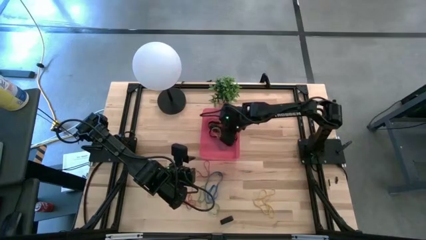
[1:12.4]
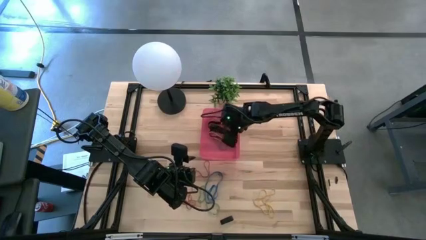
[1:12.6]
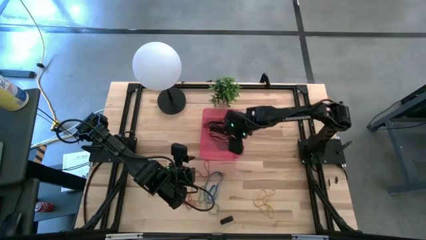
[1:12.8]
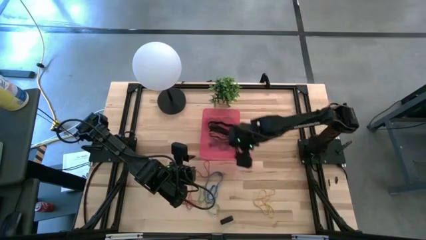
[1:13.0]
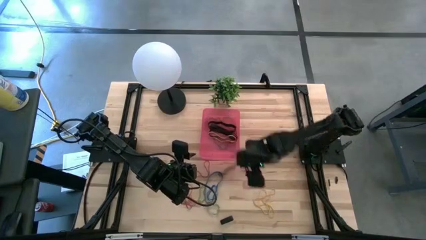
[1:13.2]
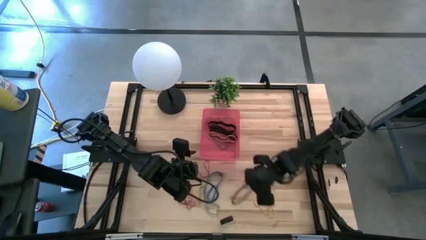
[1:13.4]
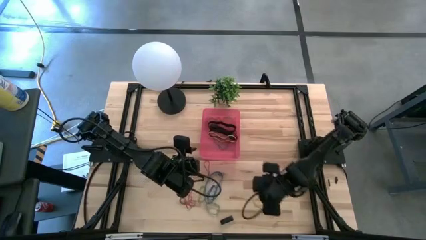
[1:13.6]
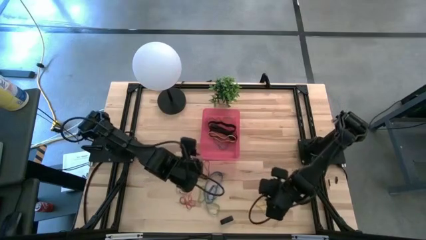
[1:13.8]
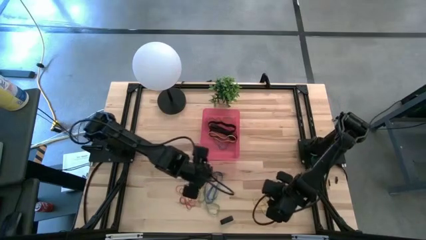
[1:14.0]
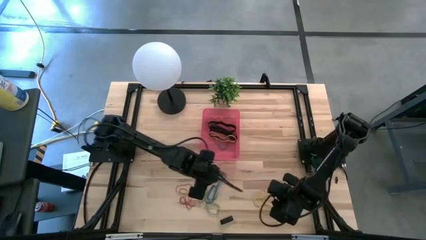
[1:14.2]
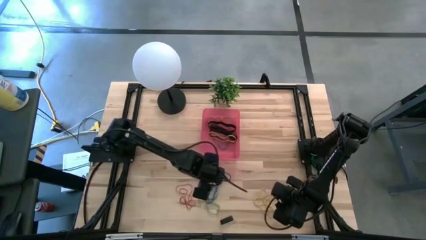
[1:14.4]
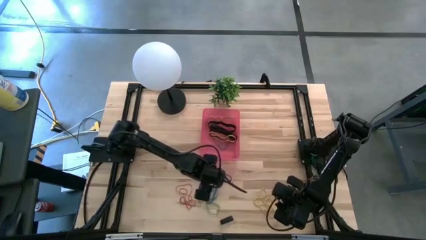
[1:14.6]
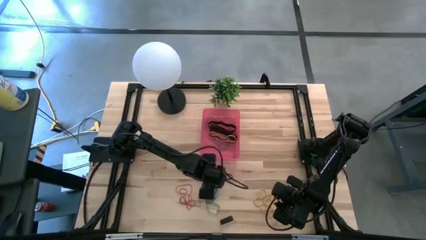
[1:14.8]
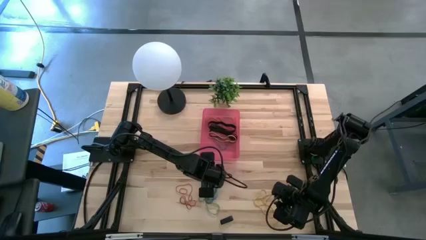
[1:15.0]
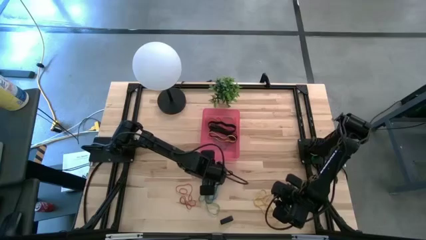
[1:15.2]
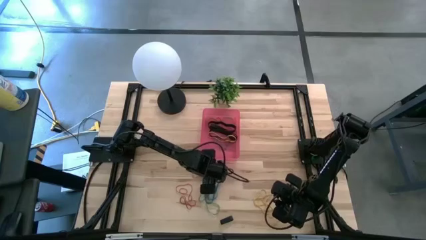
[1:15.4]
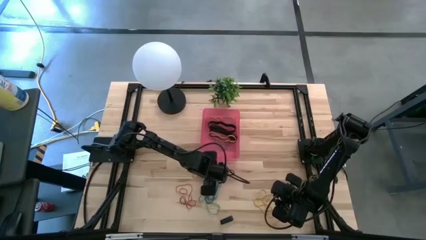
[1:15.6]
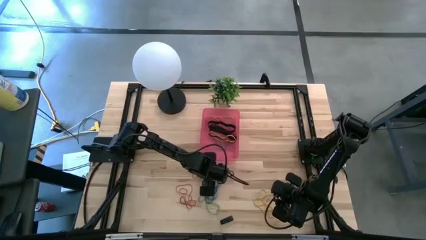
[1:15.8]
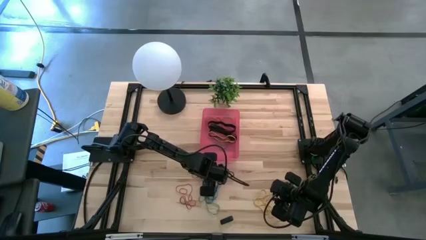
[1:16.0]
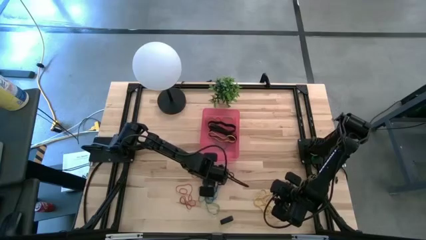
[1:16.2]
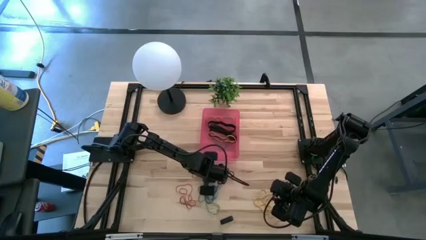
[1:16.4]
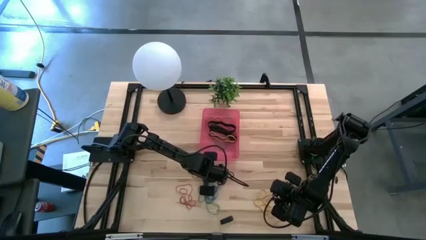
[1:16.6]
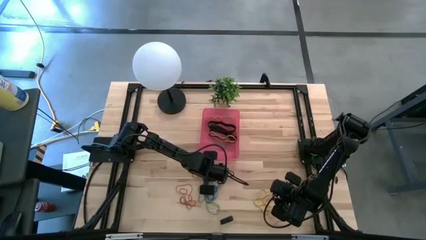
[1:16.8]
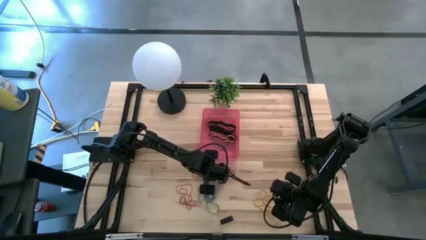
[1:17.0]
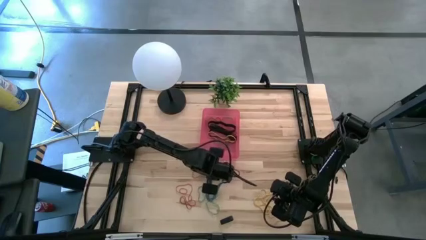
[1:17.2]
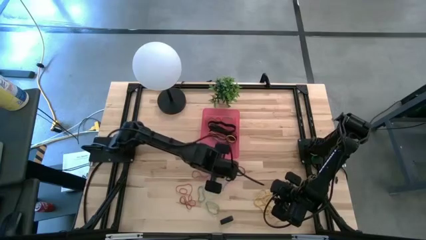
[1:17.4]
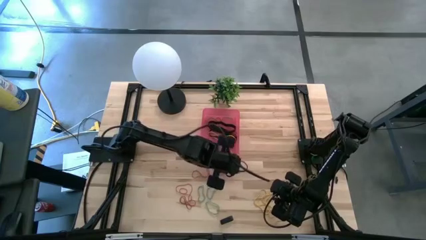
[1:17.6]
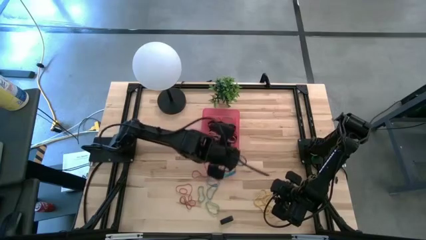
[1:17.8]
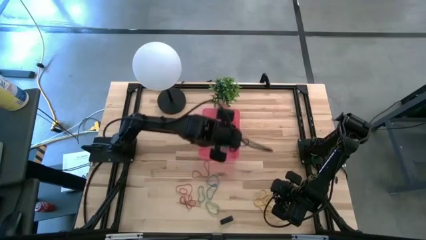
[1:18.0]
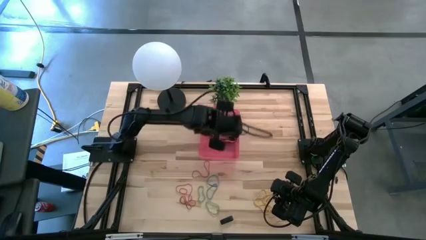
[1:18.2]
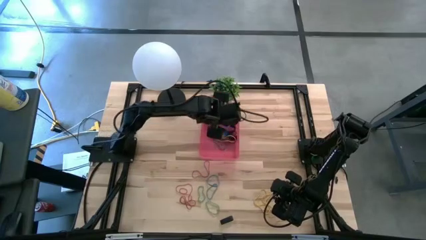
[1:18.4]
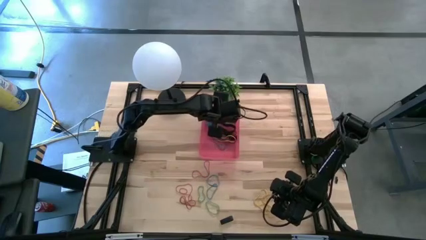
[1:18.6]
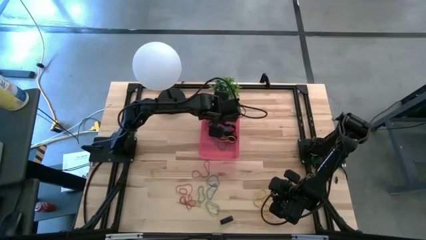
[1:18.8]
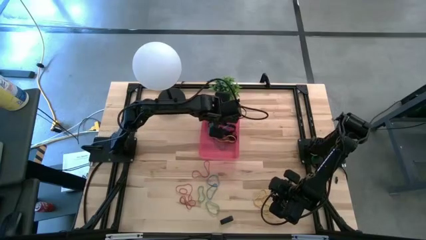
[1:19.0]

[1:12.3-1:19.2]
Task: Pick and place rubber bands into bin
Put the blue rubber band into the red bin

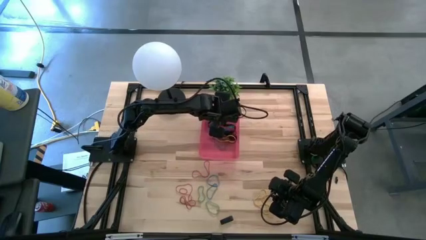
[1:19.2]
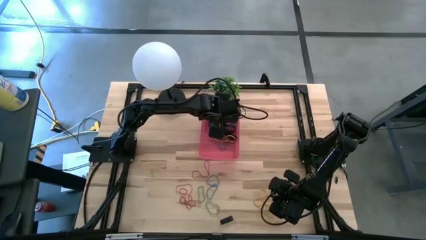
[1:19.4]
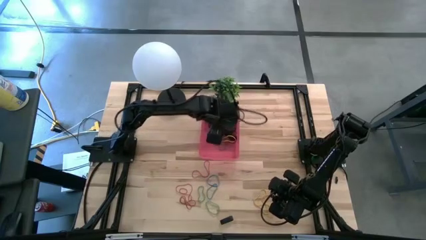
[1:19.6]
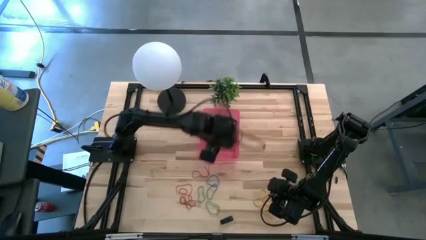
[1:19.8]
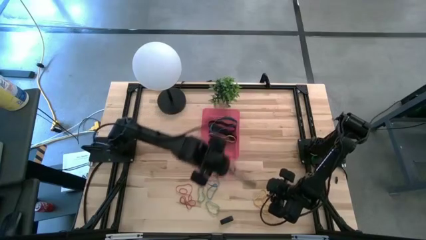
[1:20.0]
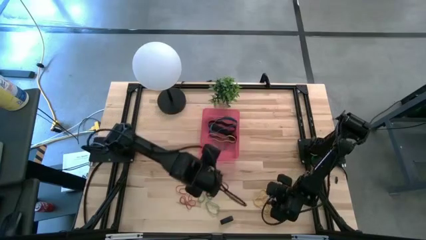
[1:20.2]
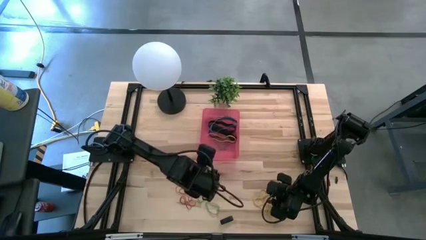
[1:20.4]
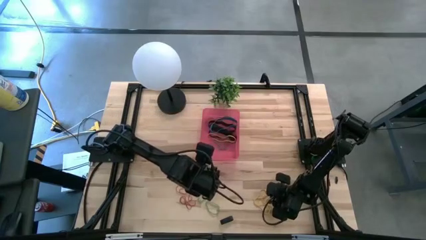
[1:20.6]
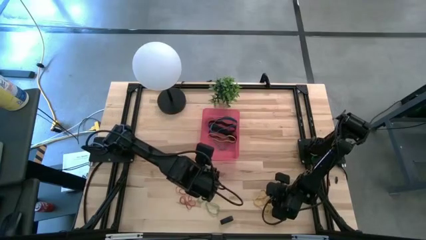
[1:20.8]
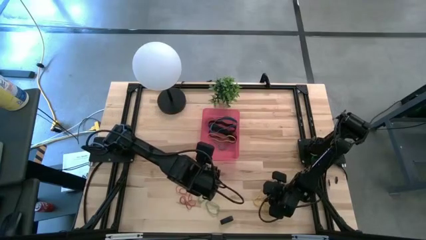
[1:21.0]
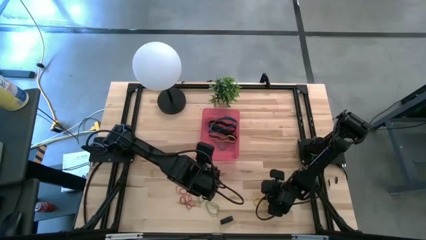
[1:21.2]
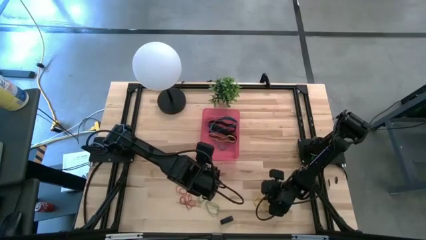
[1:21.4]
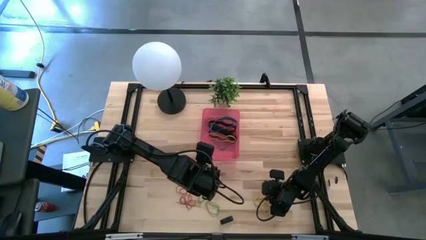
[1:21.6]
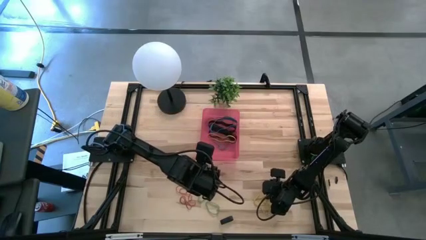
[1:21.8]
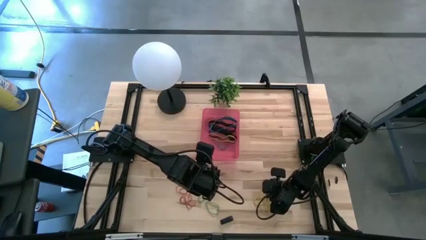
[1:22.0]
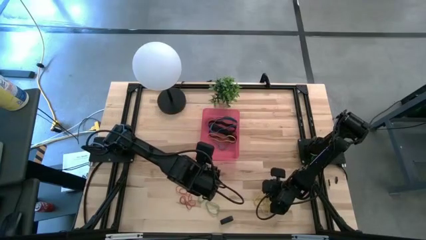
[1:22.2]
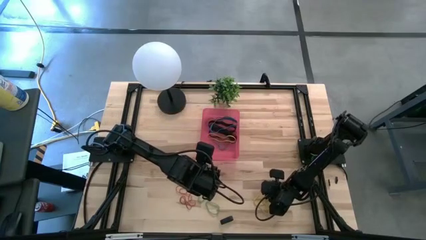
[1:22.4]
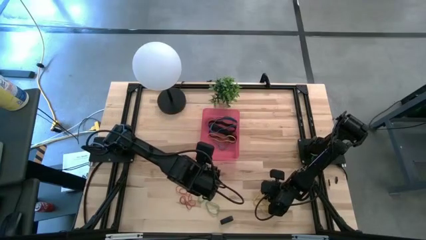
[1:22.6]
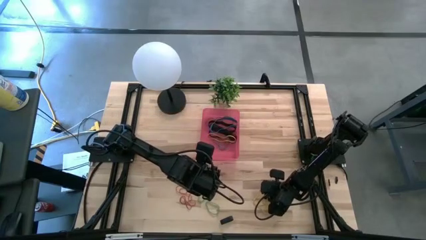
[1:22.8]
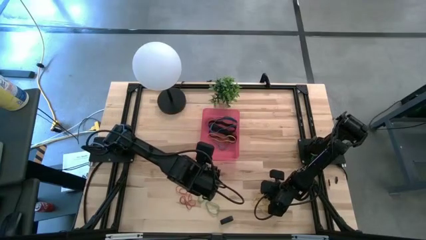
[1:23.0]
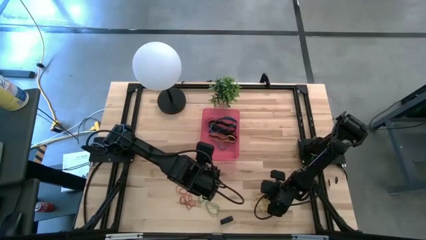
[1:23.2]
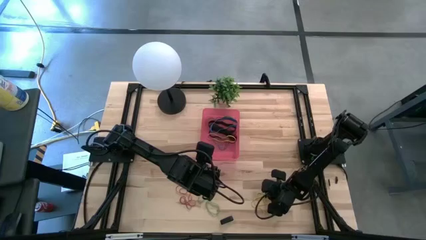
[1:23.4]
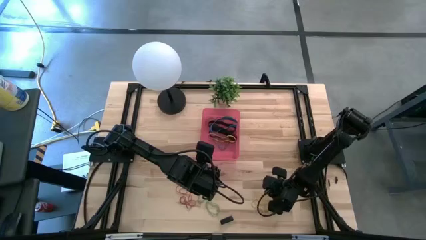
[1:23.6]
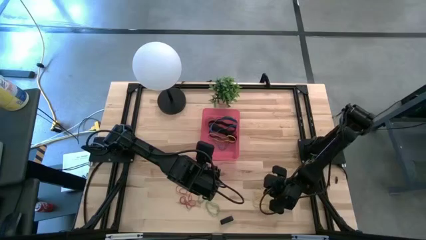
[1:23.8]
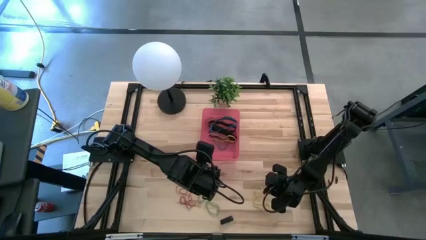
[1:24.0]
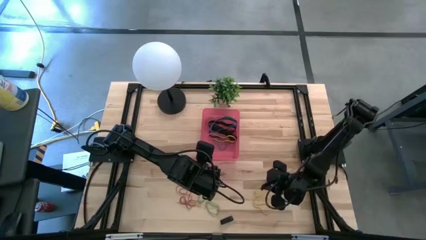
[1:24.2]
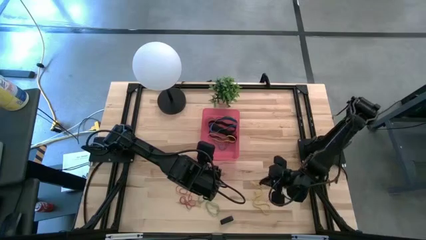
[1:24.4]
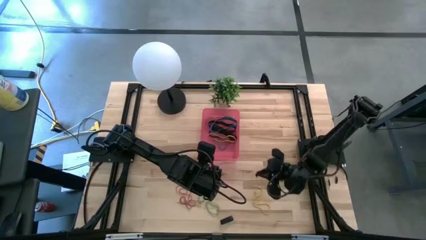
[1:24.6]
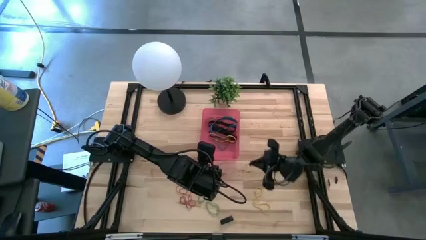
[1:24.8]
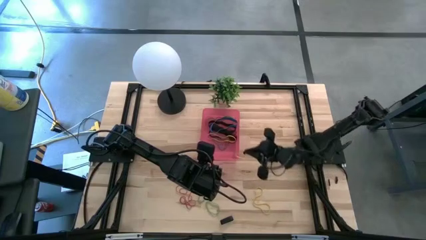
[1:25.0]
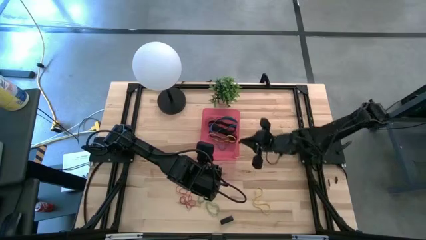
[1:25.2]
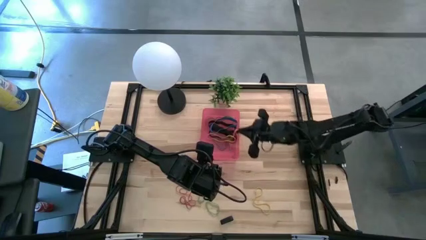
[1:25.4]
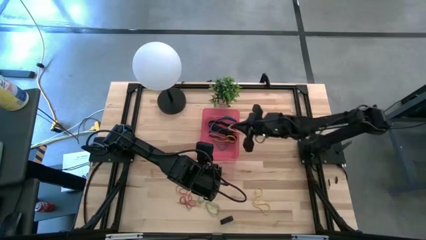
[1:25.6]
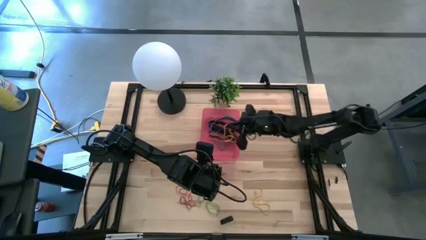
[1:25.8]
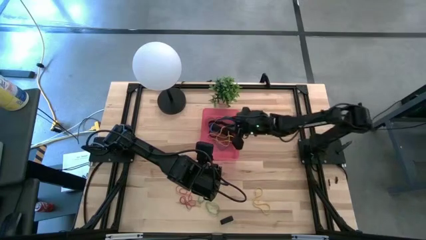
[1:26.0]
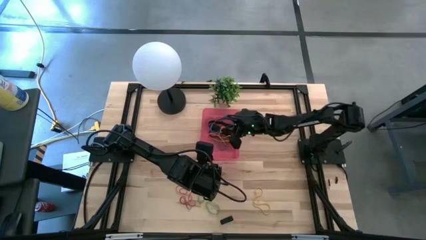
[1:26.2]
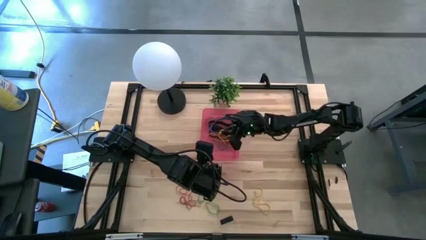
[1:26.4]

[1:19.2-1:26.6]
Put the yellow rubber band into the red bin
